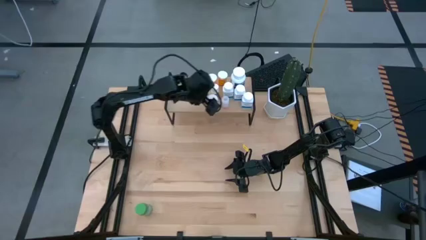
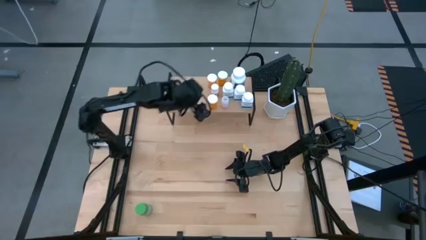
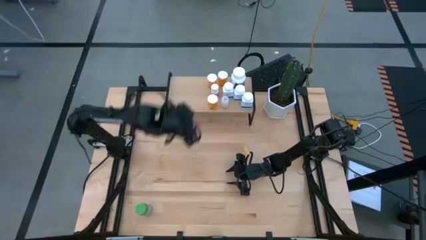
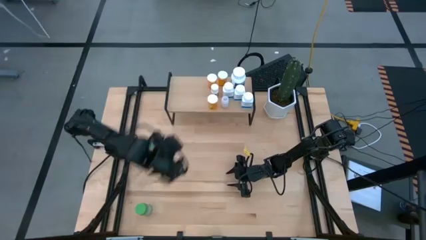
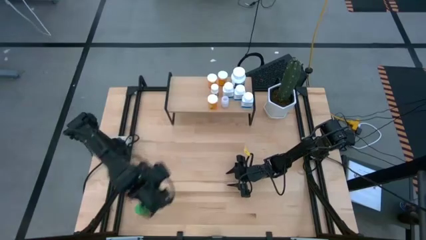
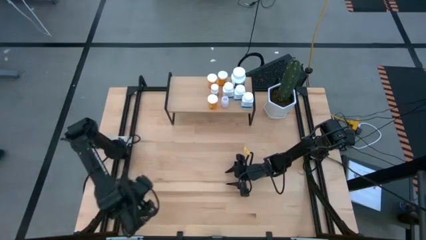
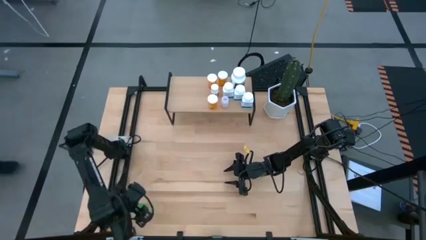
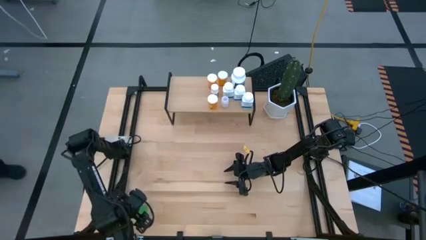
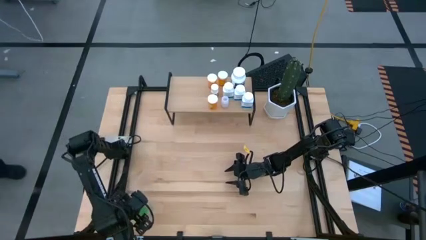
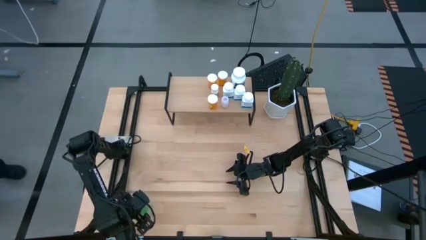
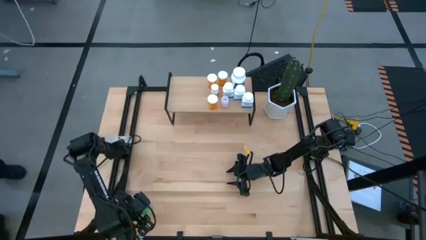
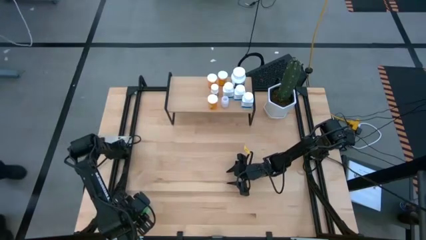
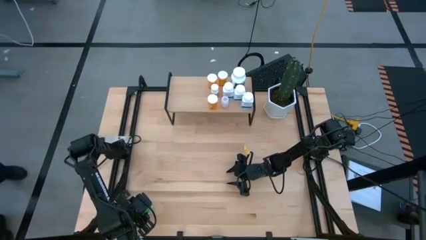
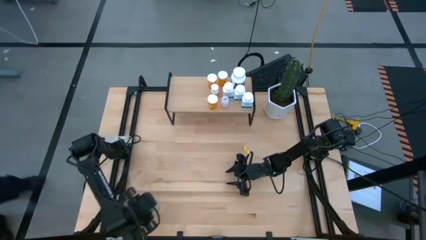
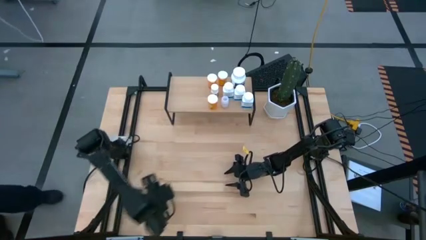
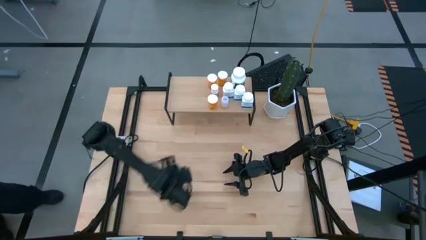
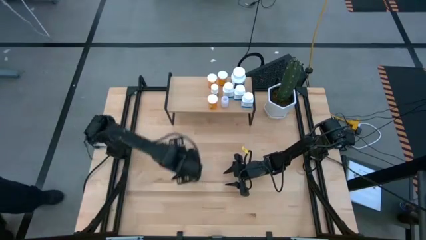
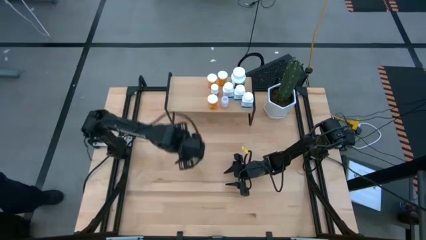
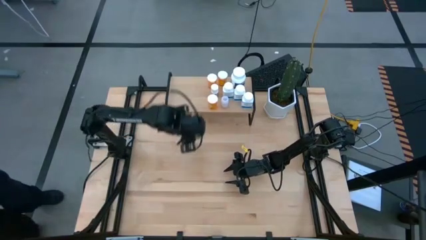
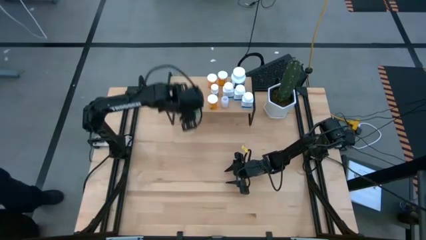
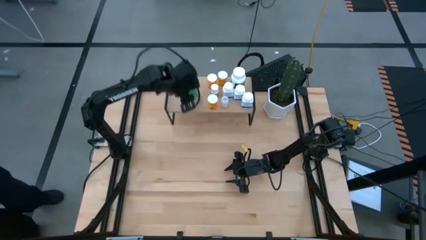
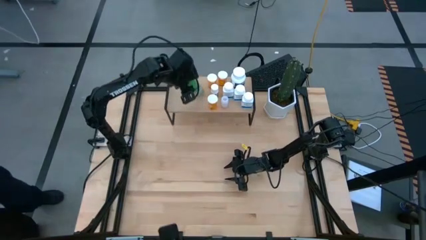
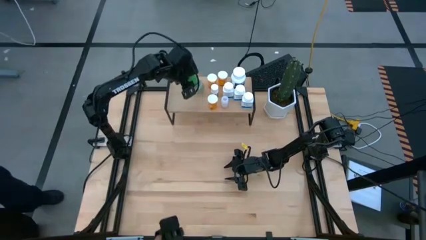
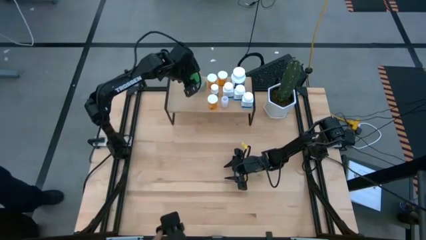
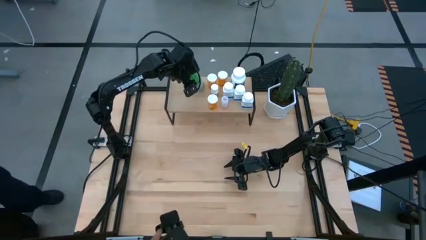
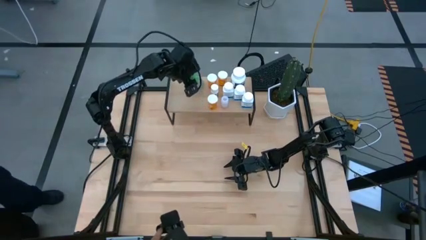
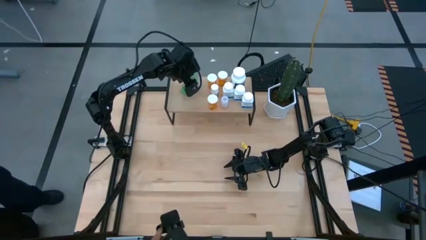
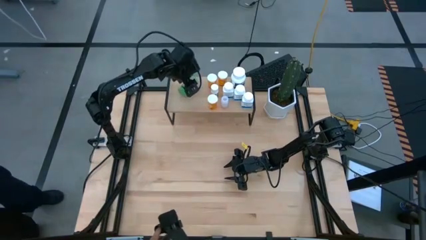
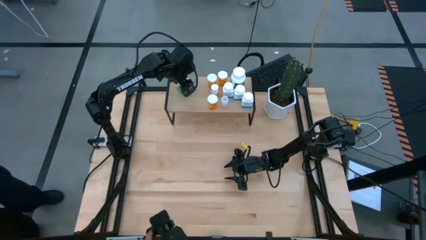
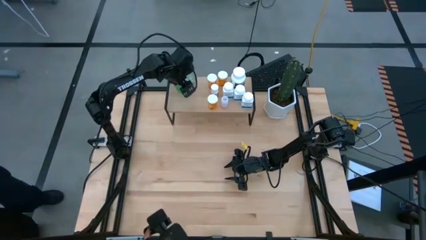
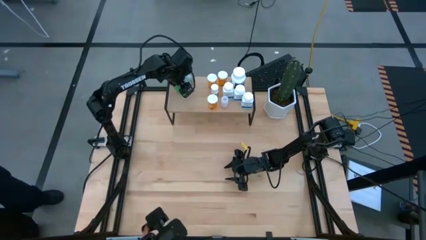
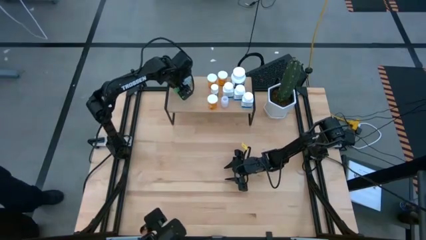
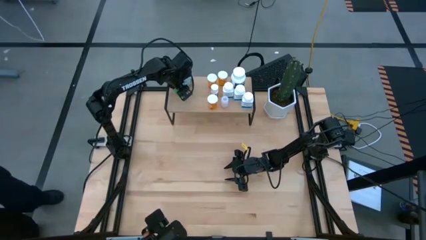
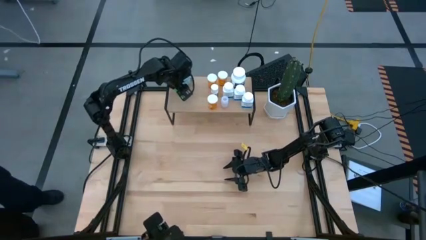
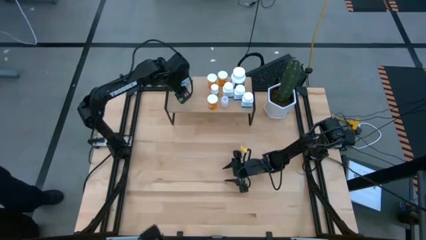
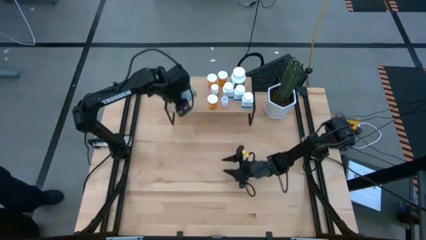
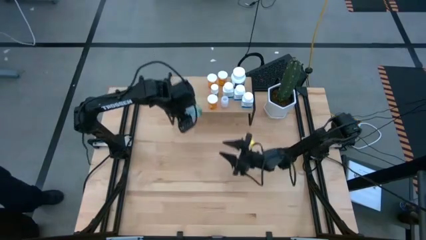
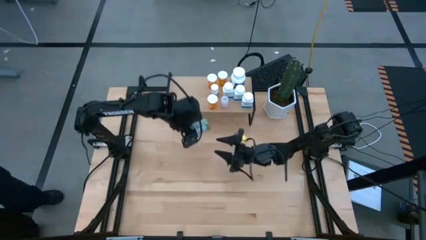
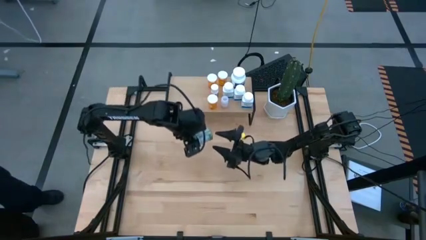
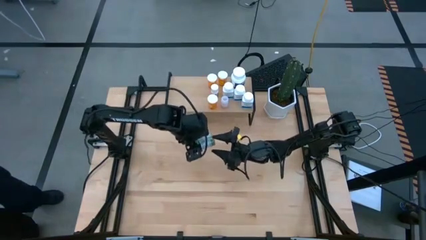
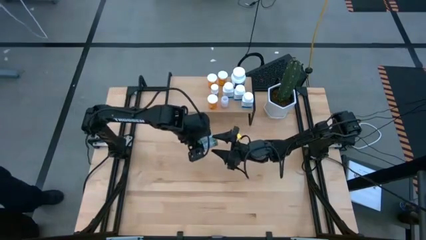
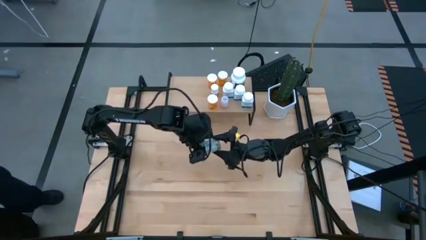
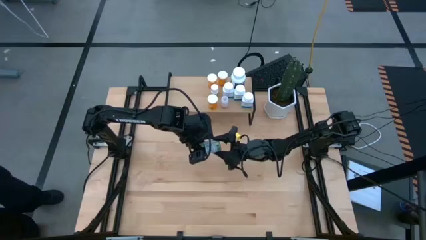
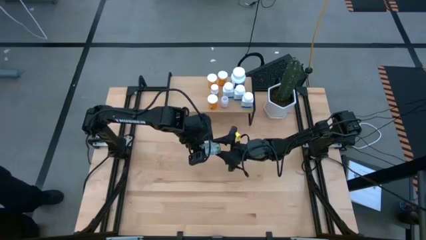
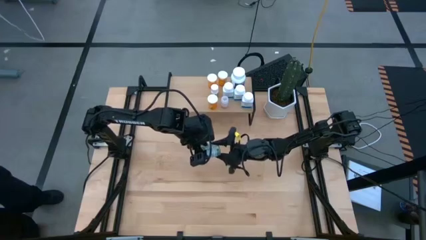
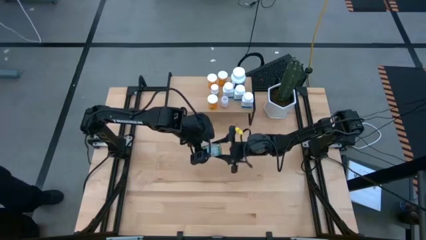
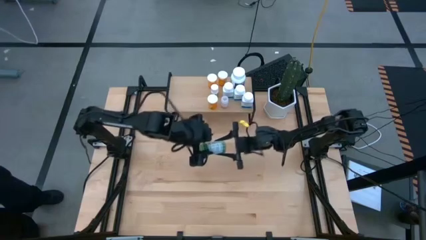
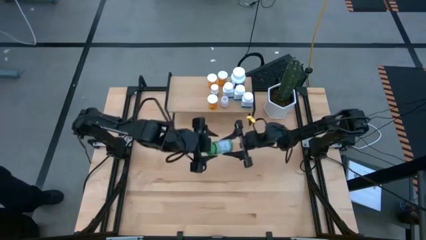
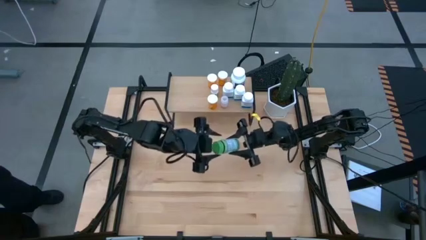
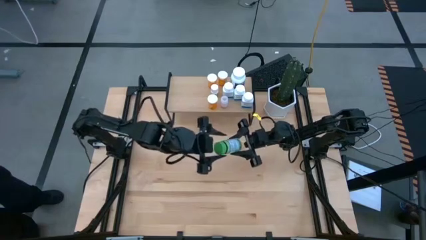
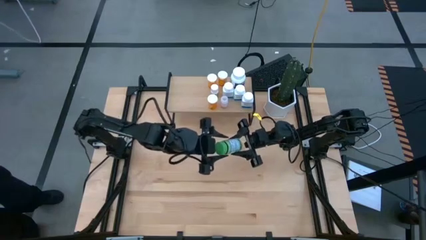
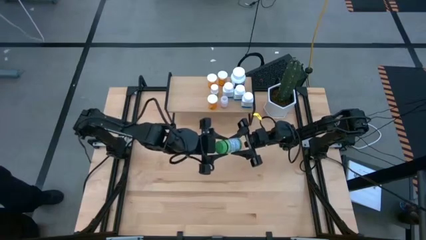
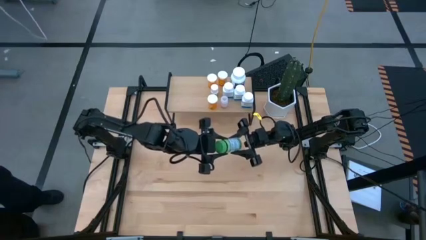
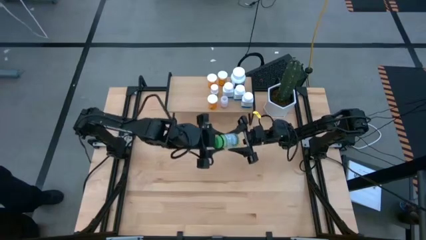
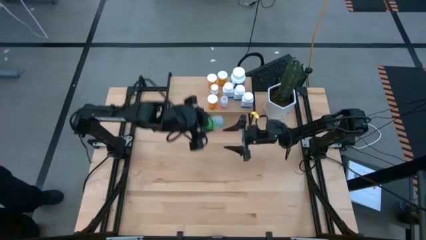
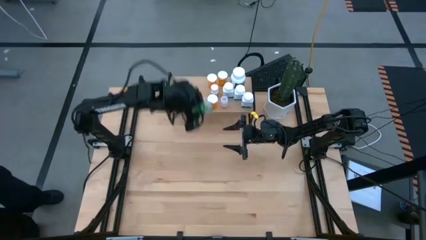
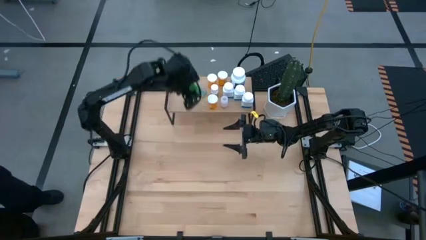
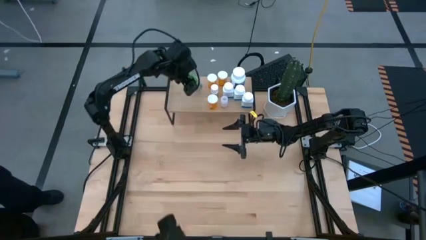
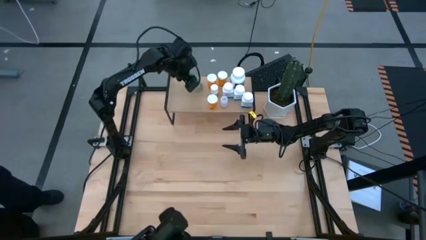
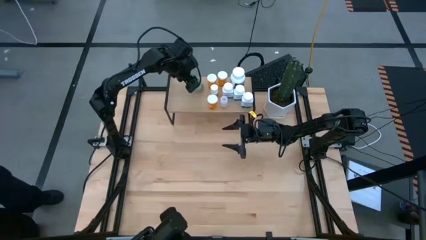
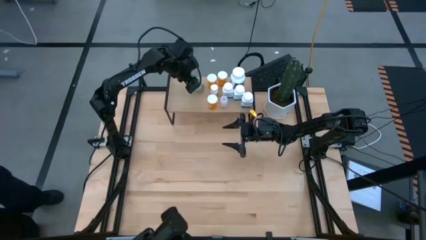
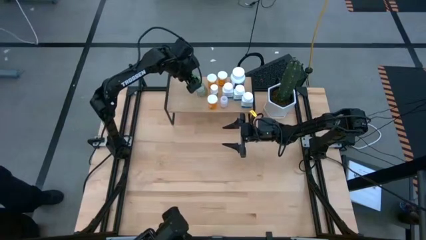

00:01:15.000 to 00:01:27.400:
Task: Pick and place medicine bottles onto shelf by color
Put the green pill bottle on the shelf
